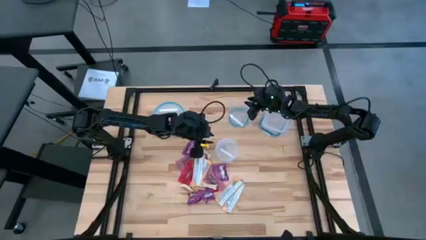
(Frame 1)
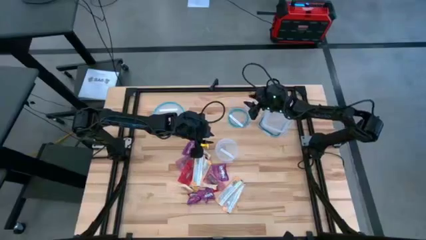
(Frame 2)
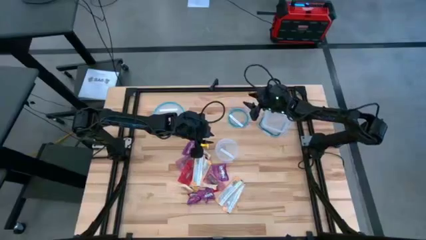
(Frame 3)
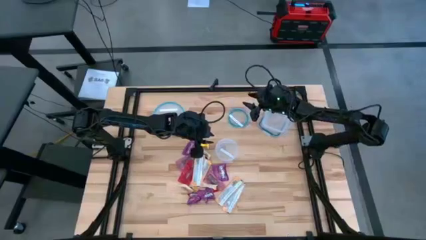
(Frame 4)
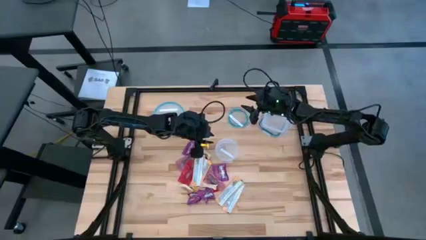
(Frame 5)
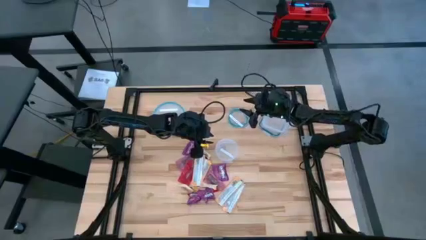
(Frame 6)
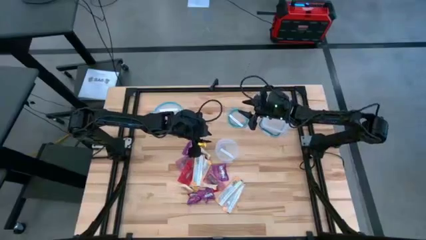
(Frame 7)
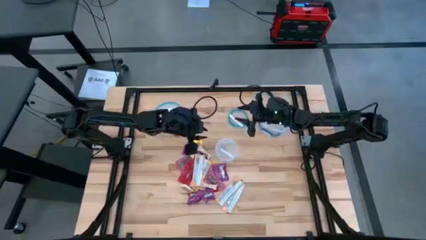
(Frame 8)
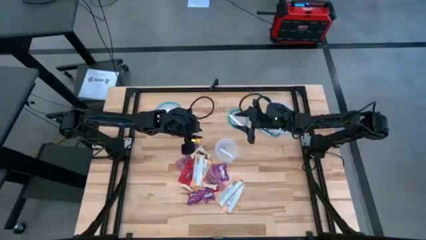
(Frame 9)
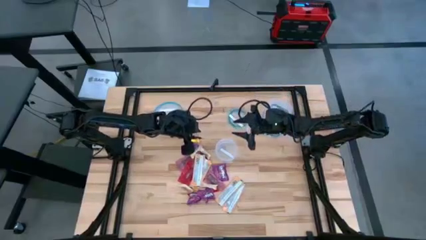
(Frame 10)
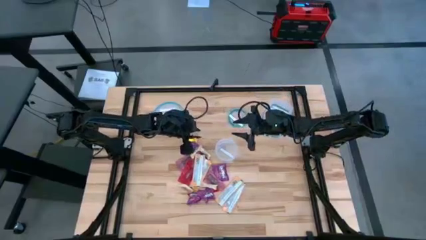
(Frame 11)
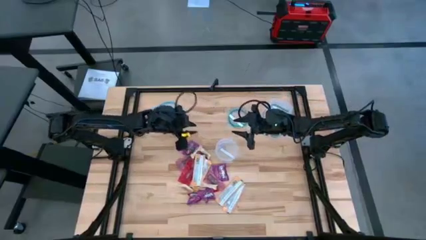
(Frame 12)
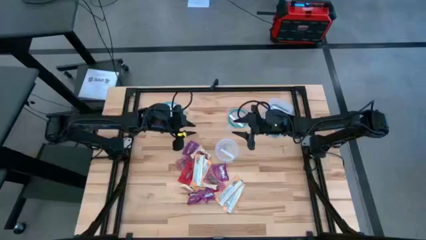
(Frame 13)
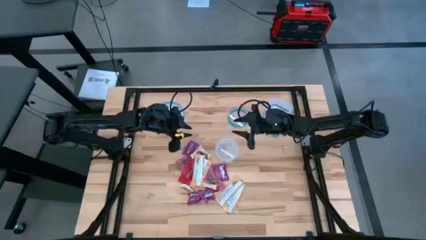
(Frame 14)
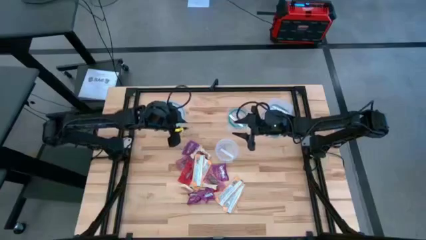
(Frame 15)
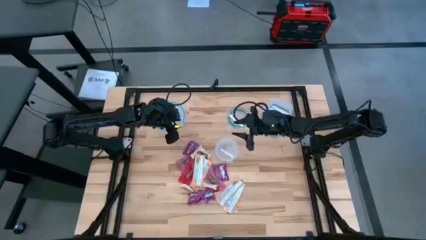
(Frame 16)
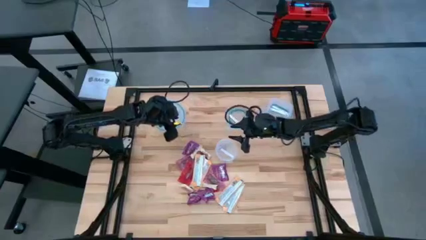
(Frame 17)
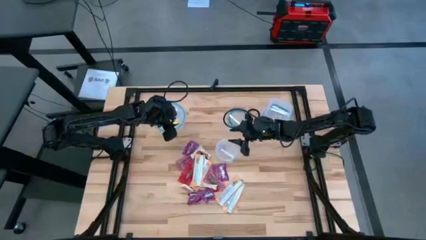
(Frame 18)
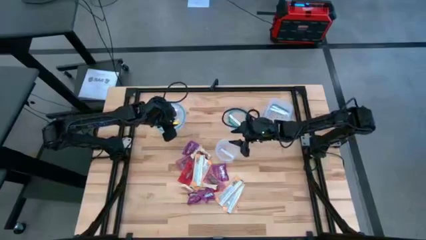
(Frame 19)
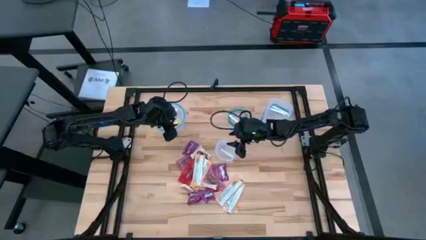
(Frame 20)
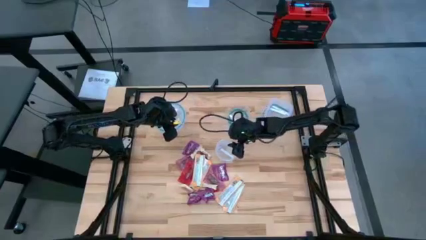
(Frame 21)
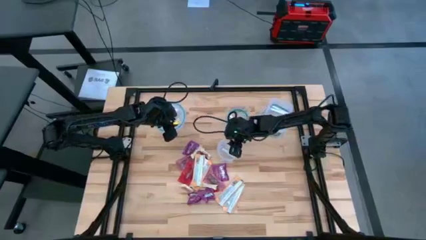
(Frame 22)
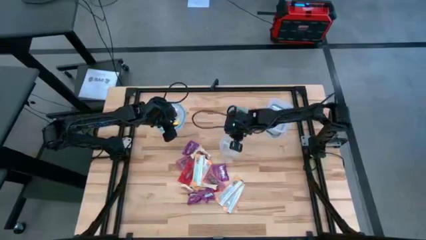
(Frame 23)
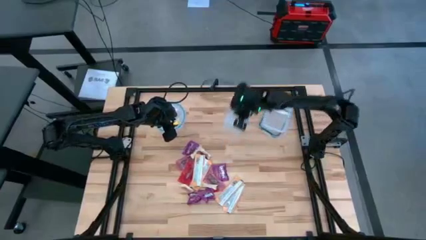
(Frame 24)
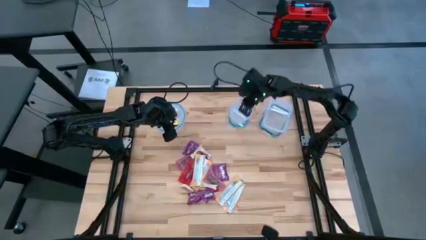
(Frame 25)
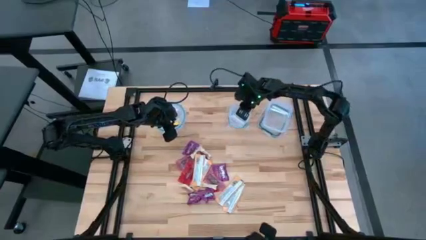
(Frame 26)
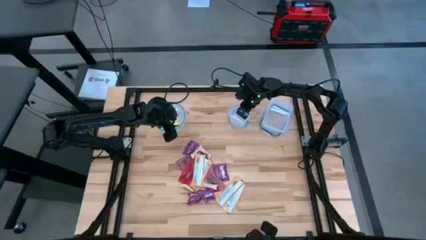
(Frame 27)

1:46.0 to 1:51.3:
Task: Sort candy
Put the small round transparent bin on top of its lid

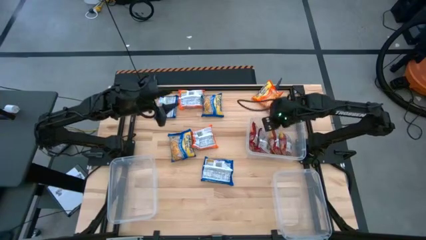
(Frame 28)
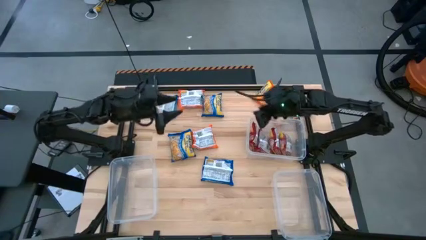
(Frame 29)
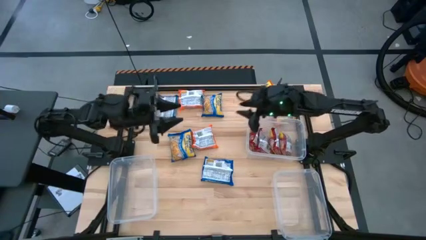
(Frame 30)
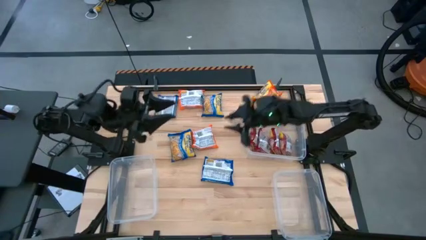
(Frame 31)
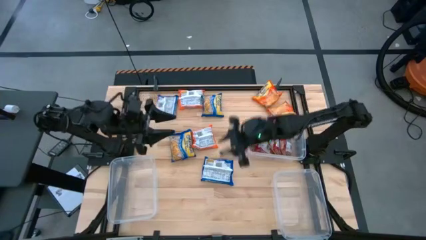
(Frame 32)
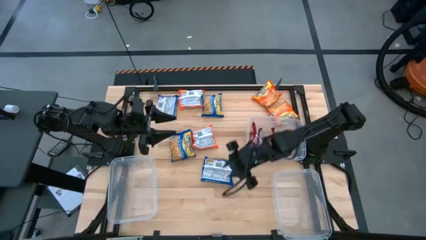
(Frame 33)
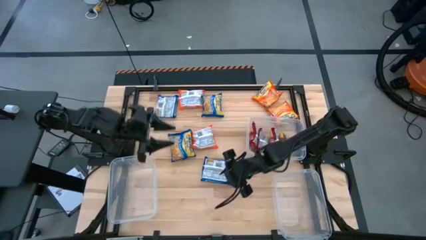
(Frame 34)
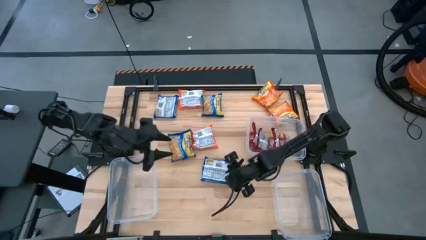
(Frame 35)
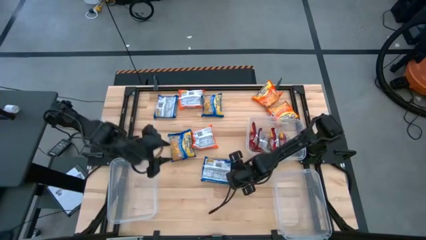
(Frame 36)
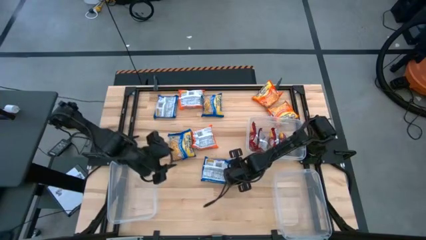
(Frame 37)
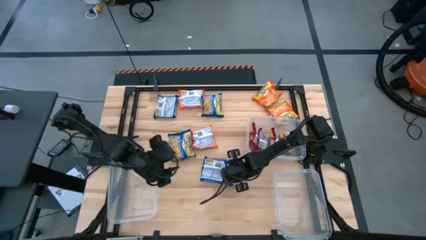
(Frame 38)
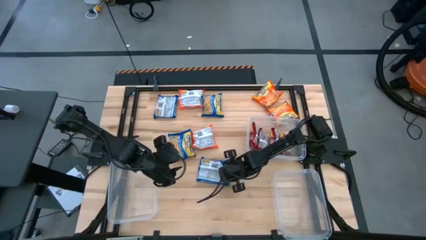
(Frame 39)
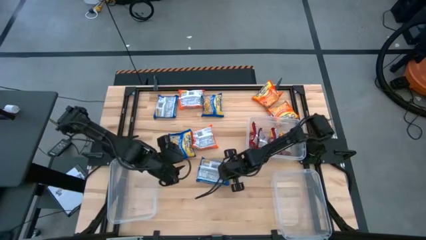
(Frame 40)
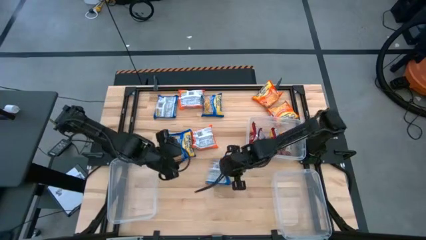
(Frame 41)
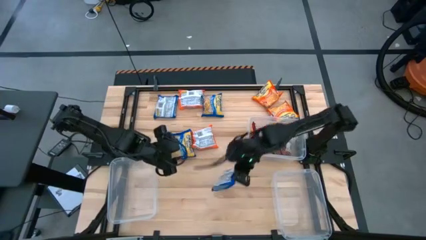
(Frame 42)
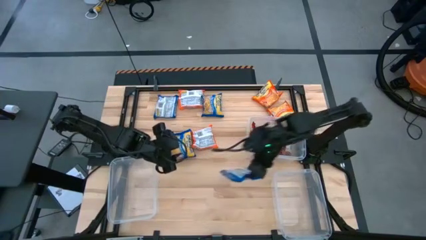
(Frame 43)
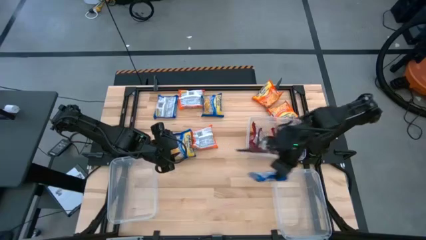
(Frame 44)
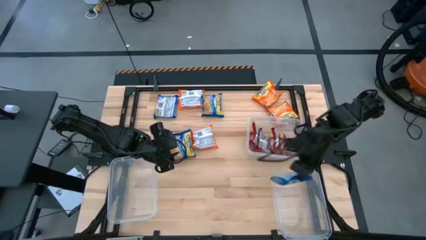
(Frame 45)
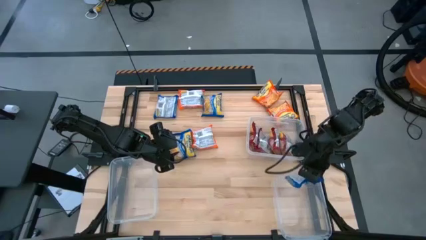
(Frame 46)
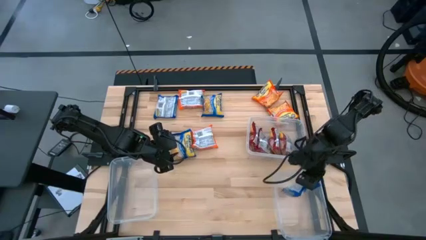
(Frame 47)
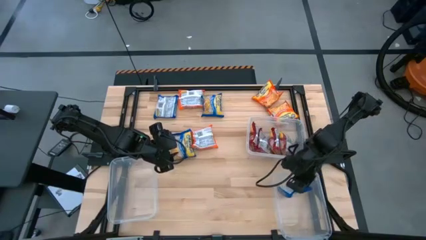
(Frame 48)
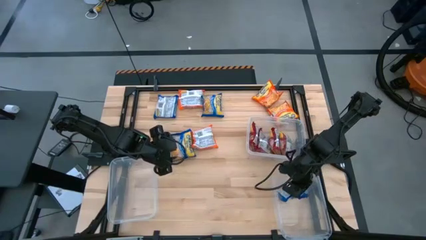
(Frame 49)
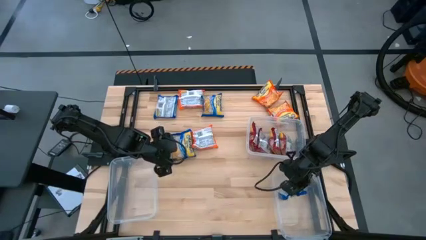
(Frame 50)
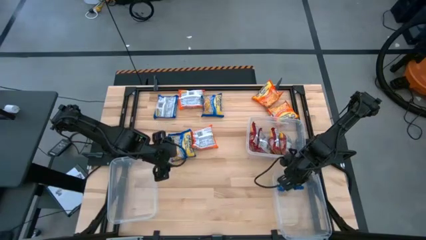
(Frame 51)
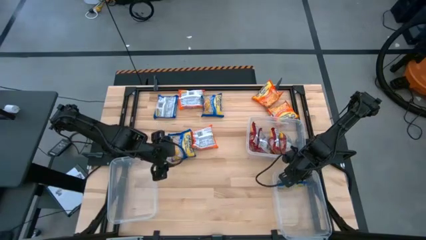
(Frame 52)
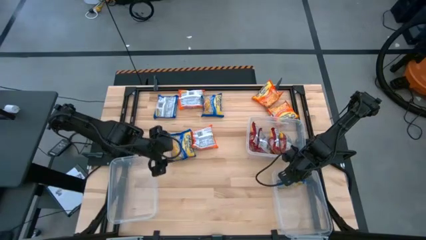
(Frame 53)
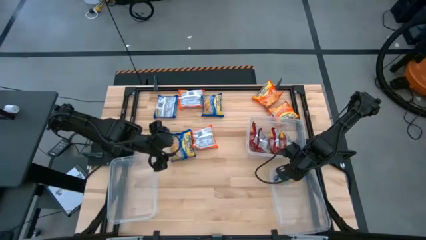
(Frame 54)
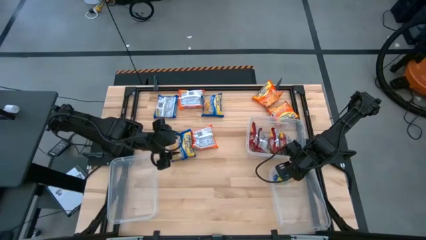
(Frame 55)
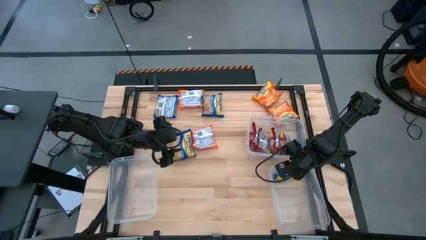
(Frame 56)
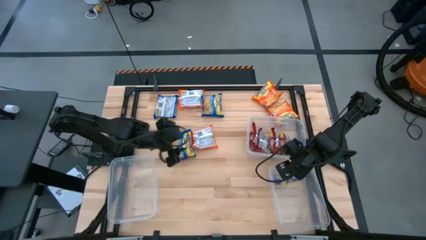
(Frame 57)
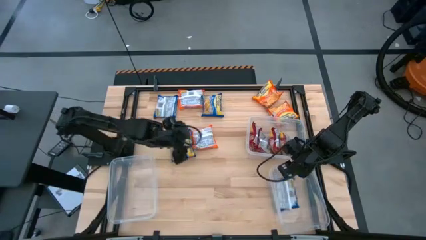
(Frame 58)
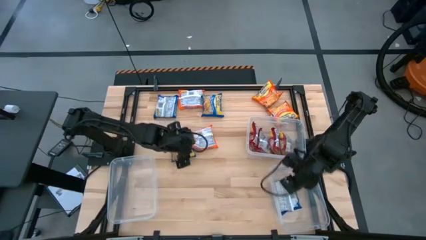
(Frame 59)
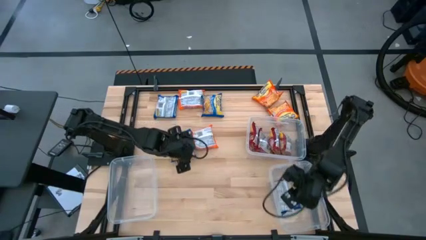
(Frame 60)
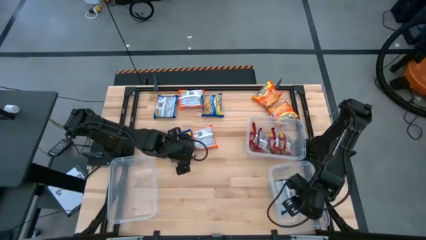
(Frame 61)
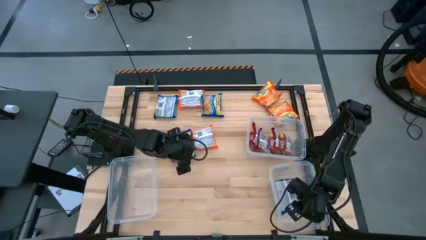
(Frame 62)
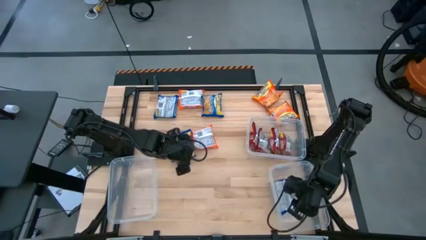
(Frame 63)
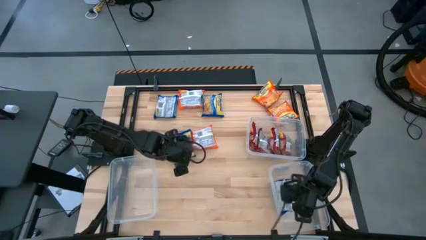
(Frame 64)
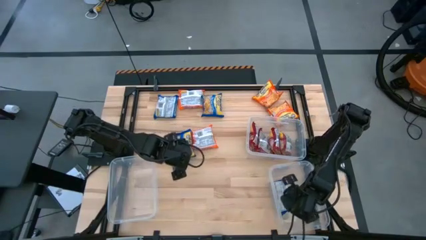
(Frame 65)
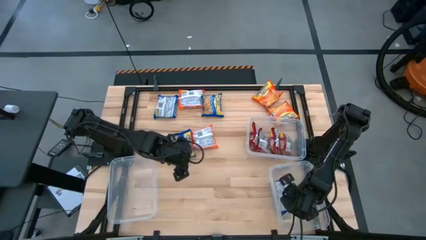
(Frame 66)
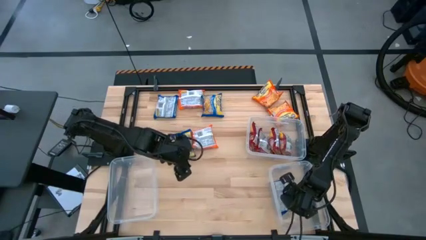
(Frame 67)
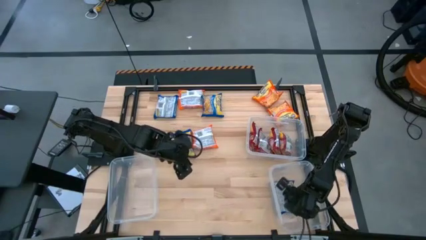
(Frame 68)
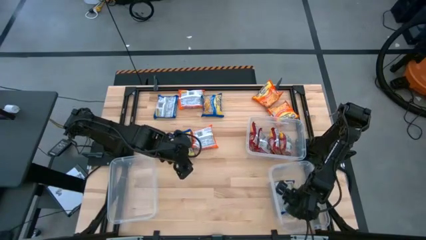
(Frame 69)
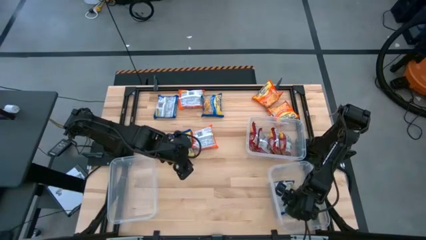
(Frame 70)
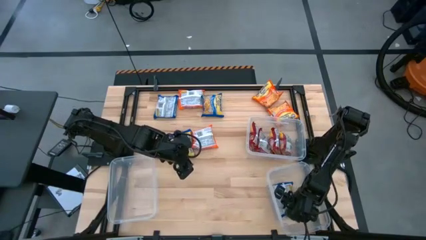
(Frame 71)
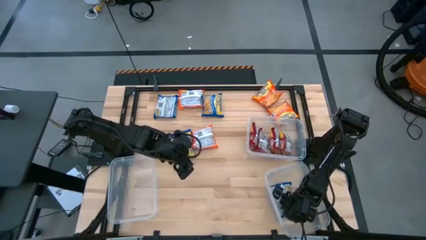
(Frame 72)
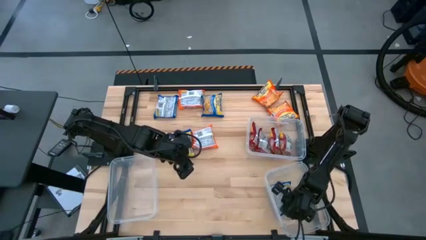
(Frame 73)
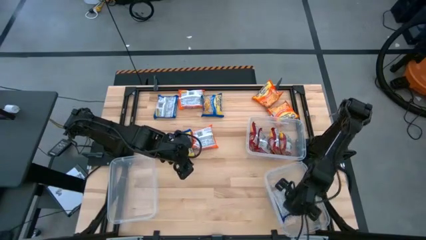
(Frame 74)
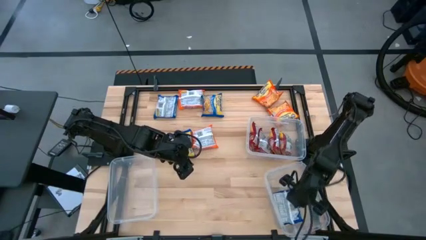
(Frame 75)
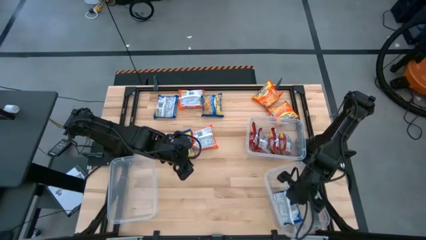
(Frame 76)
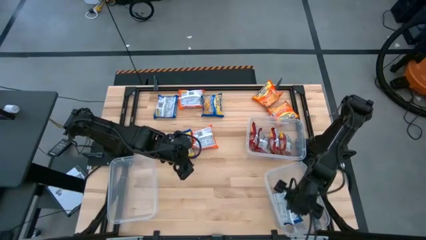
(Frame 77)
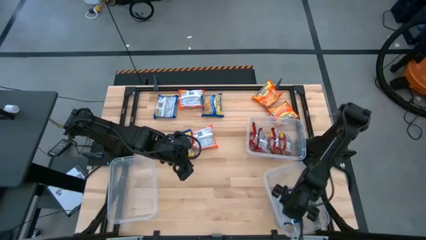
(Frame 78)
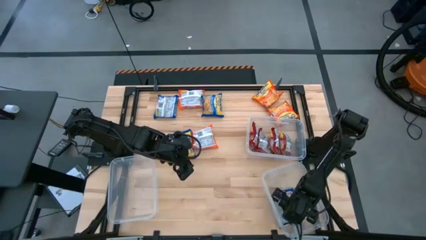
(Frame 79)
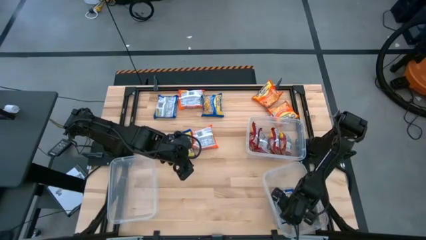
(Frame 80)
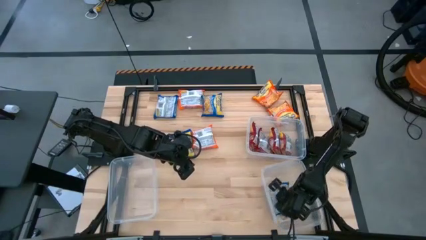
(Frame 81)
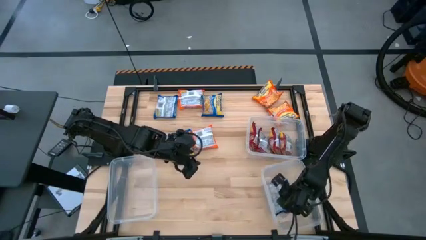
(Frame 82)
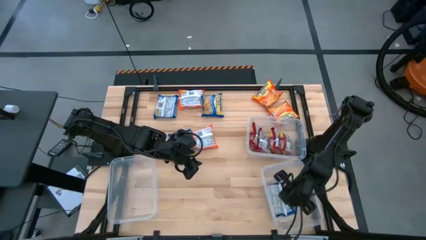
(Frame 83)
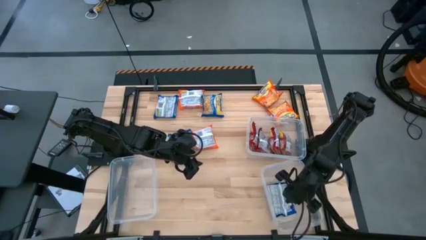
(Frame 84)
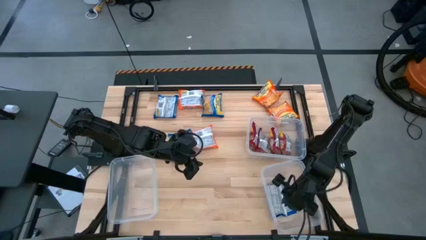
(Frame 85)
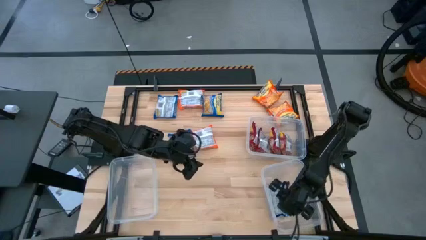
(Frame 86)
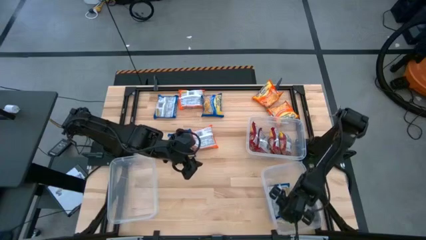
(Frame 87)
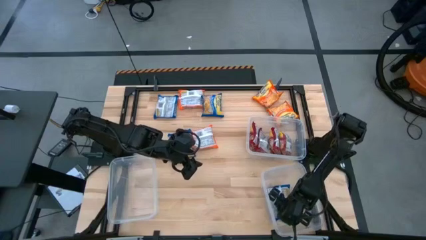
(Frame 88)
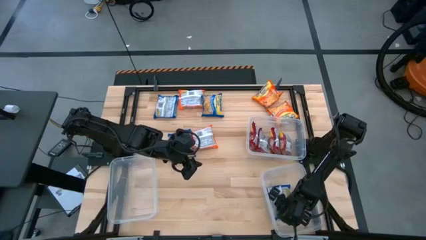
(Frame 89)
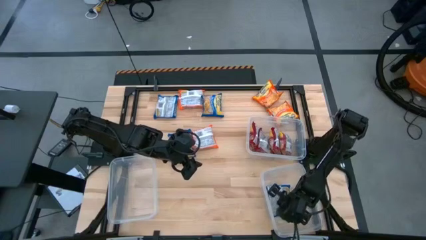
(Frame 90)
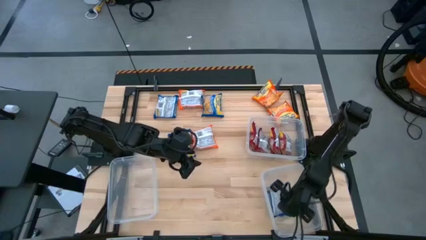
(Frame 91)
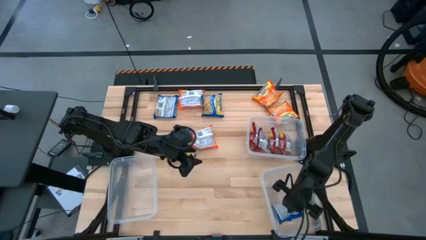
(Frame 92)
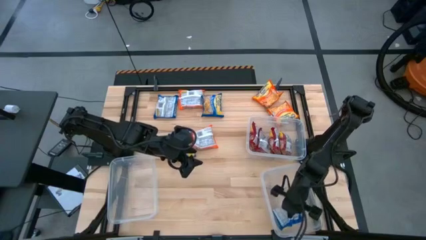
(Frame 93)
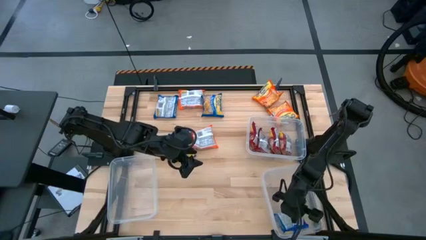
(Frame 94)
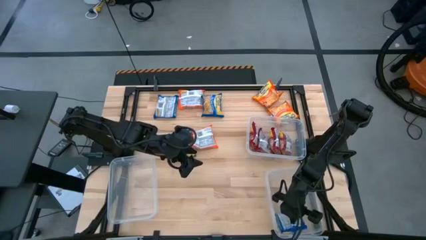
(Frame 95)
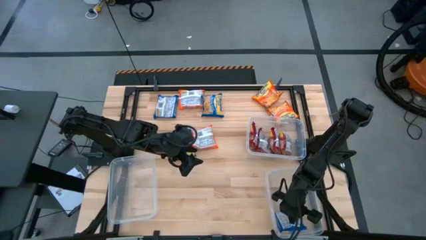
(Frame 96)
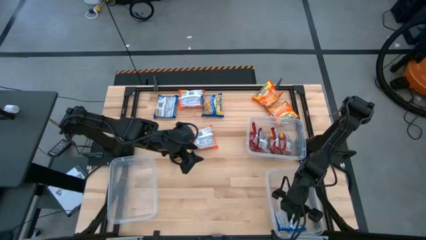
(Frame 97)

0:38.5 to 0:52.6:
Task: Sort Maruchan noodles
Put the blue noodle pack into the bottom right container
